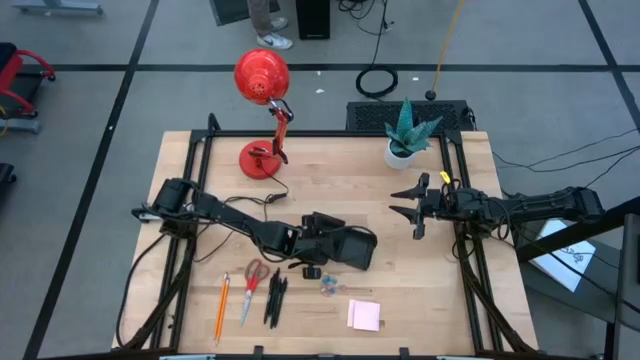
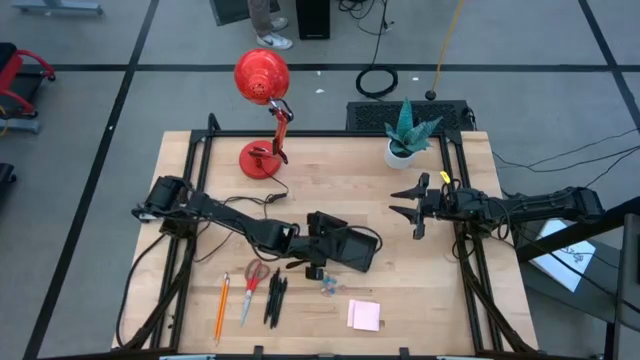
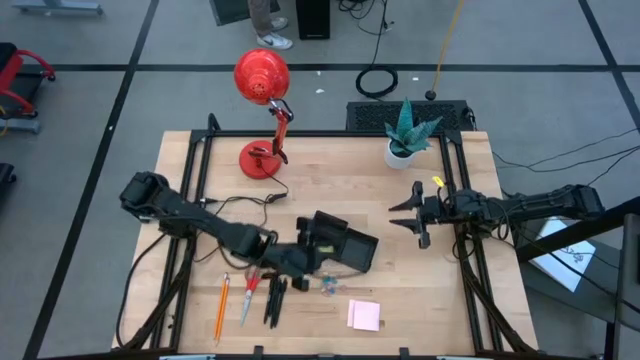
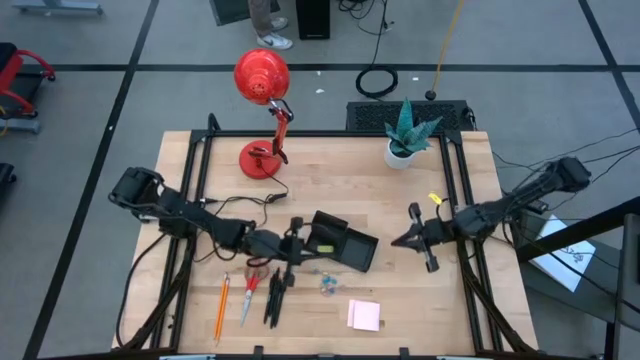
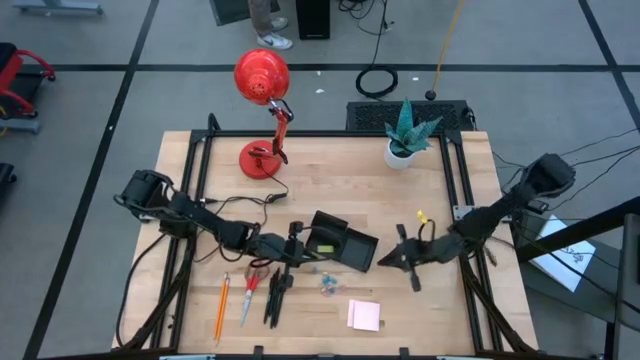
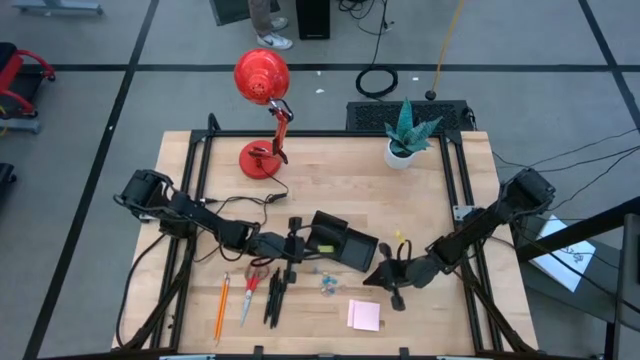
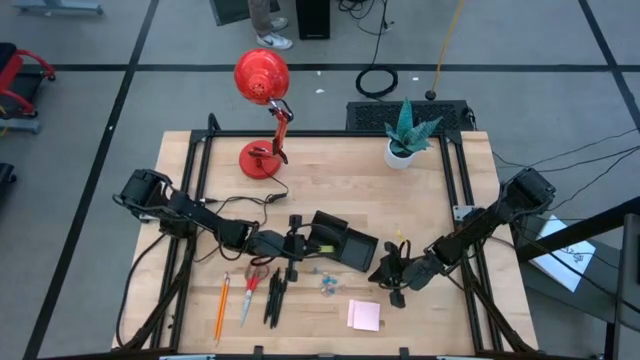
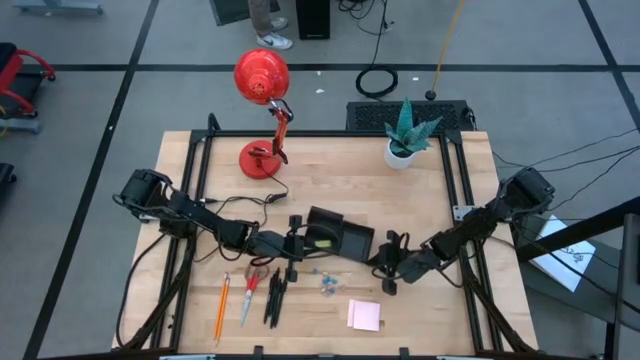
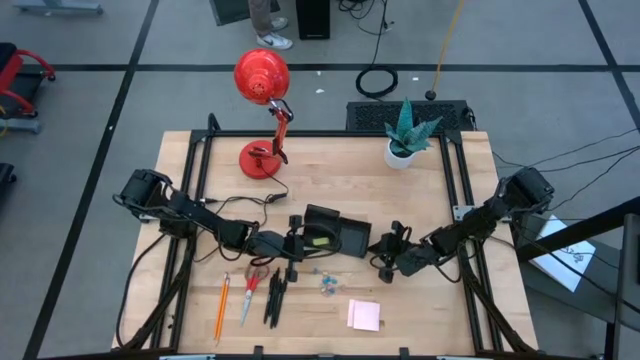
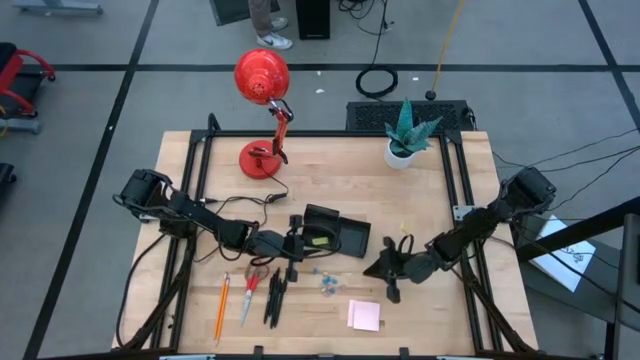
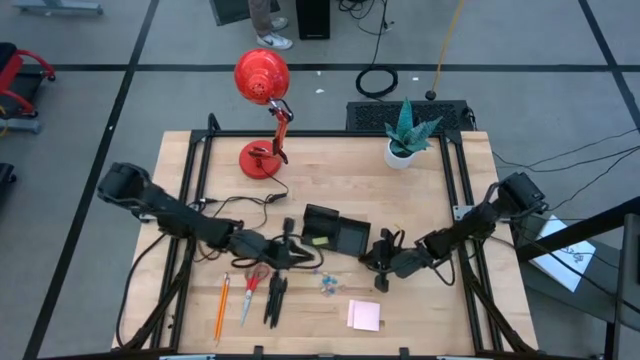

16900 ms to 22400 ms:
Task: Pick and place office supplies into organizer
Adjust the black desk organizer

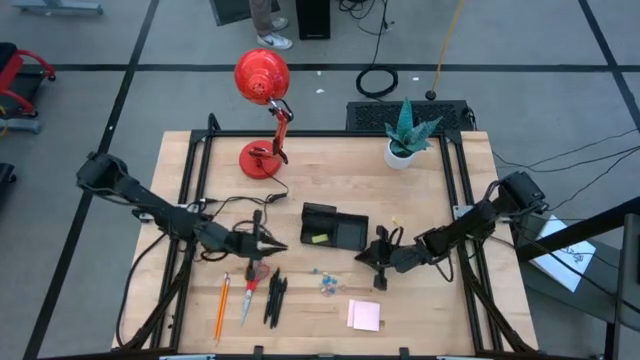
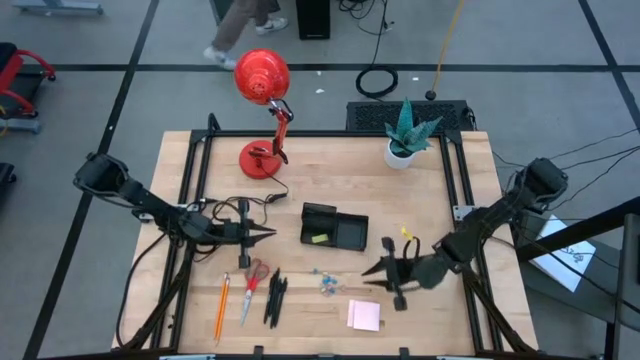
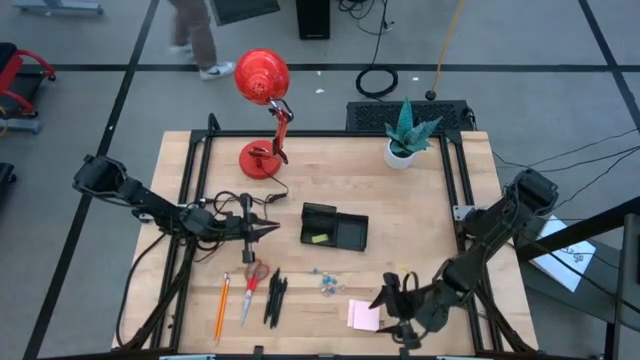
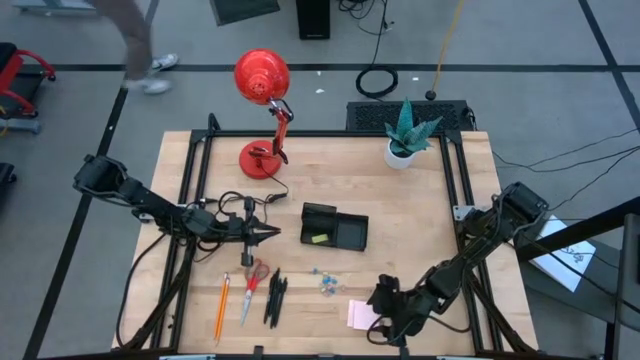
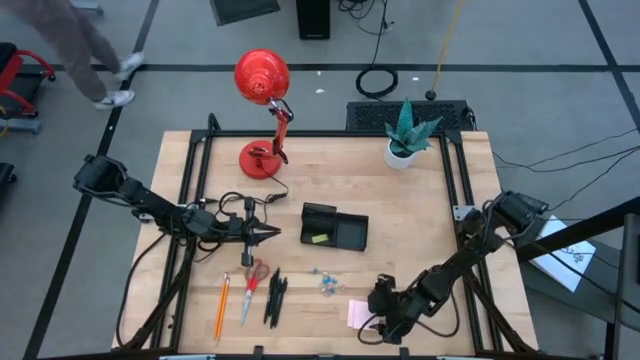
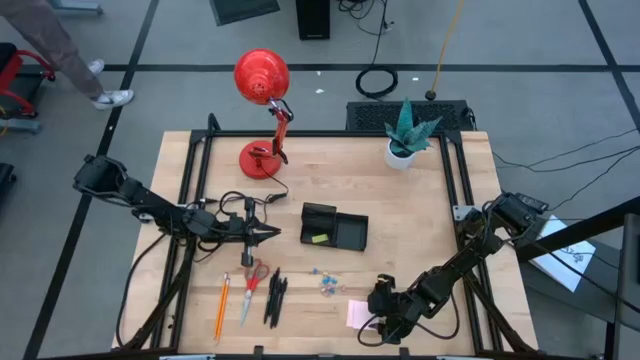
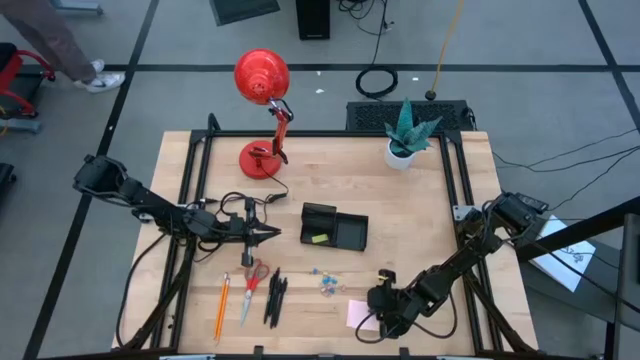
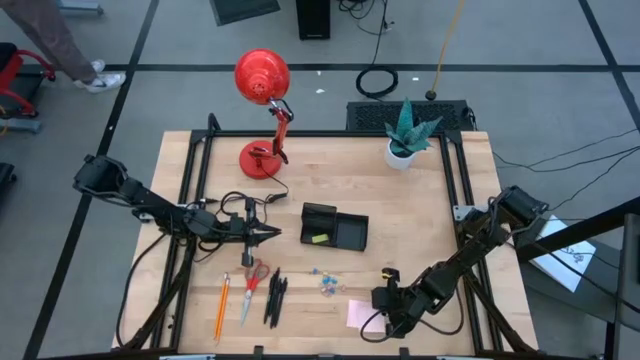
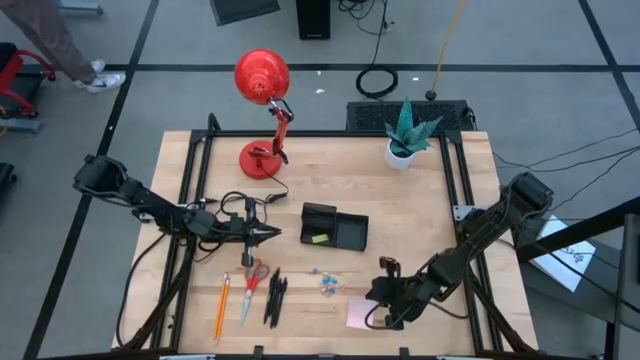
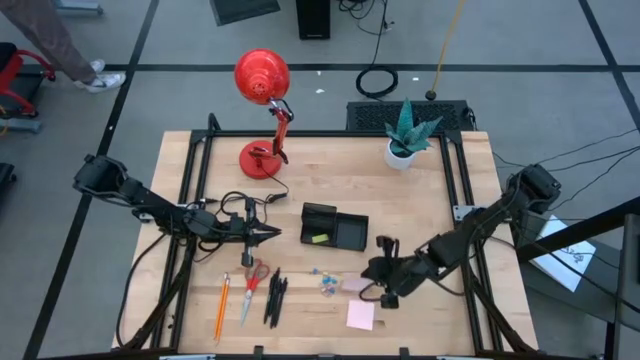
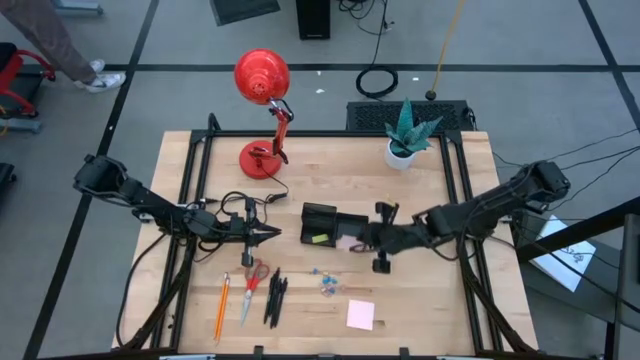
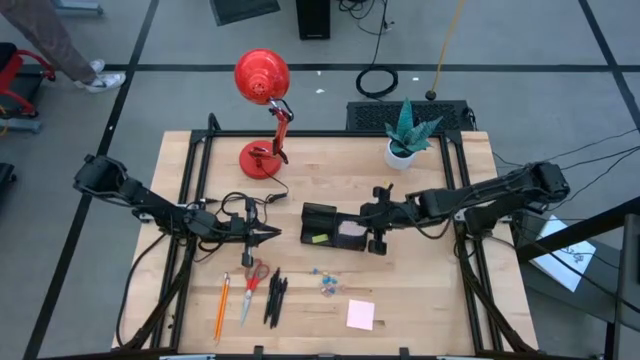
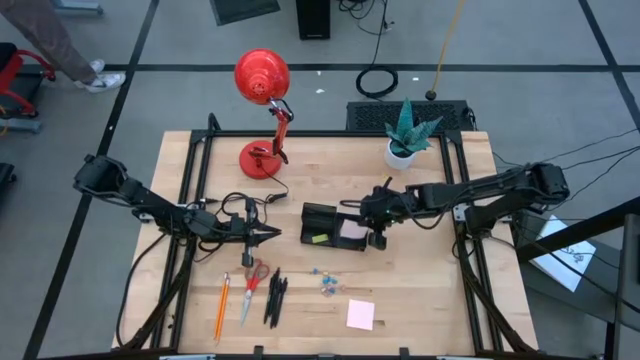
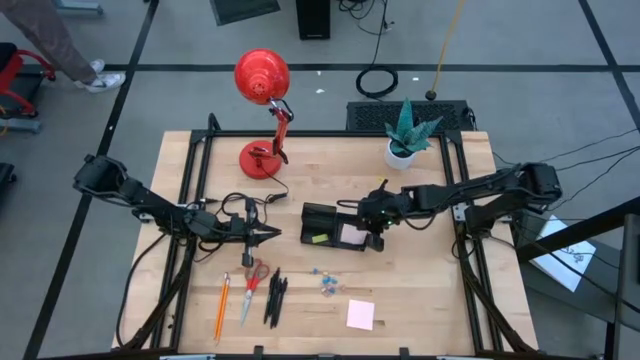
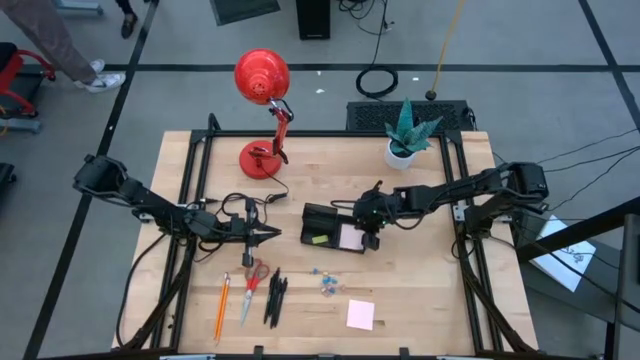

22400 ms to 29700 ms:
Put the pink sticky notes into the black desk organizer

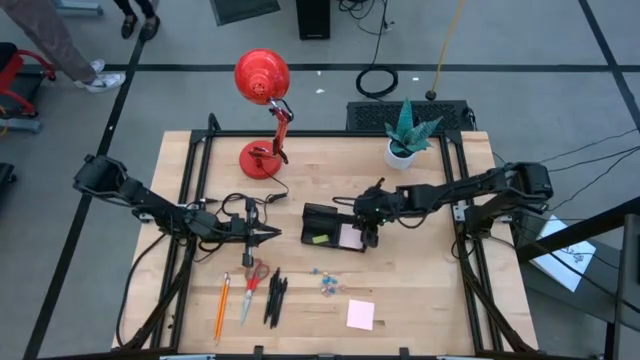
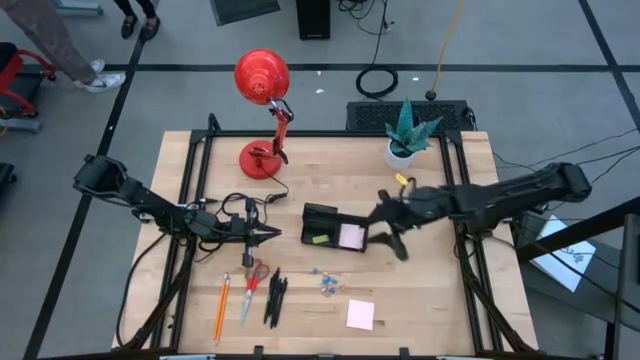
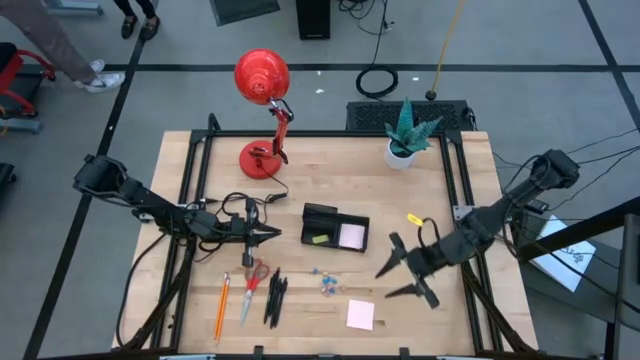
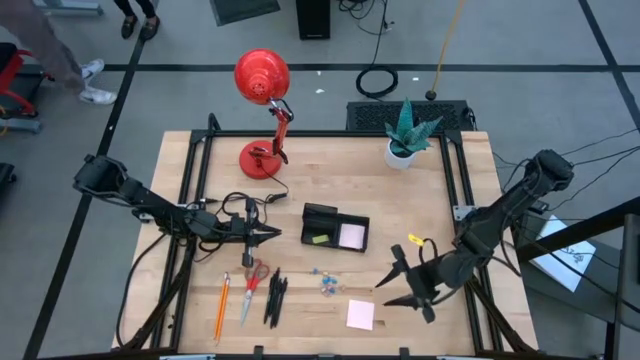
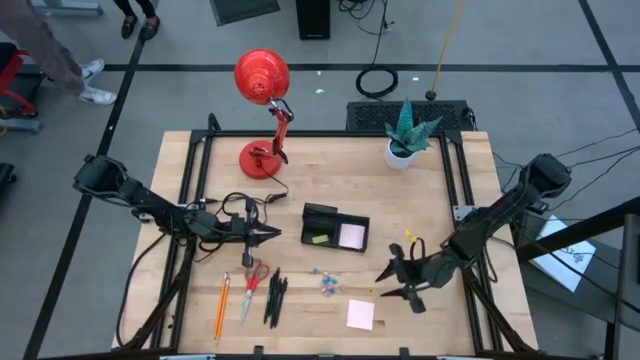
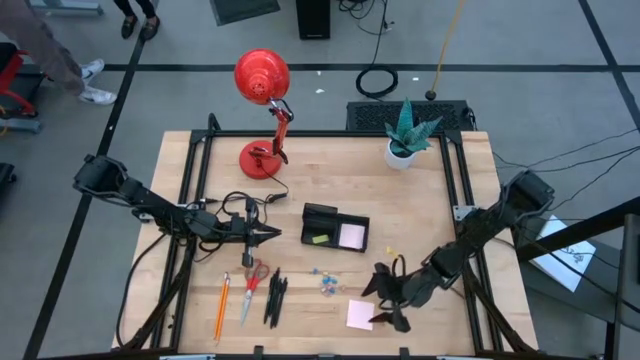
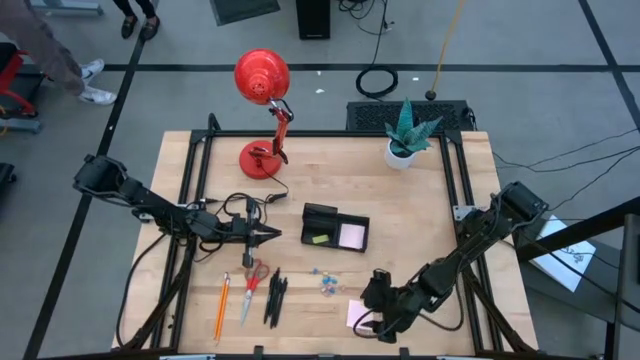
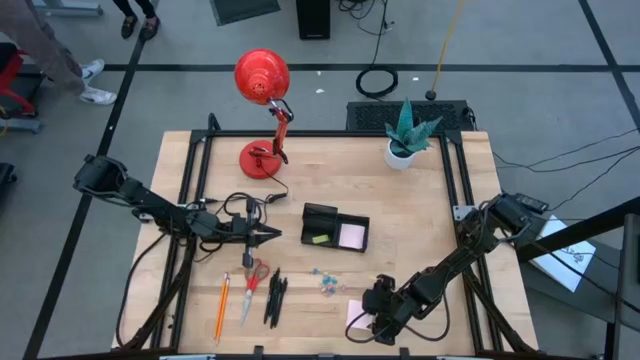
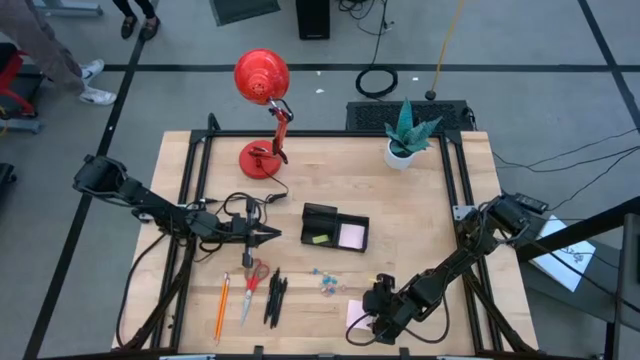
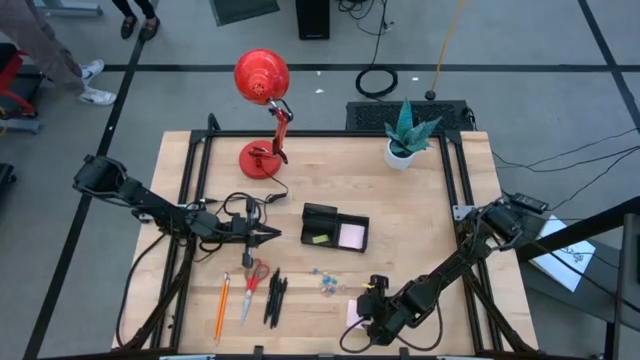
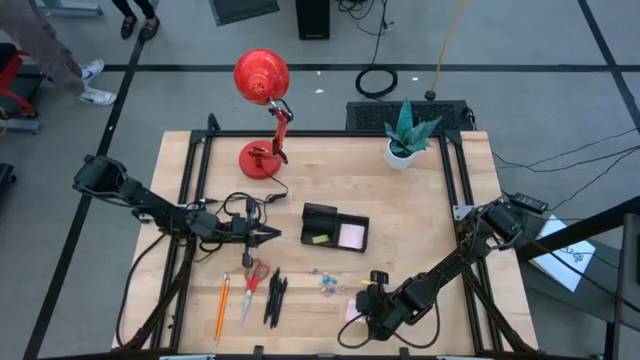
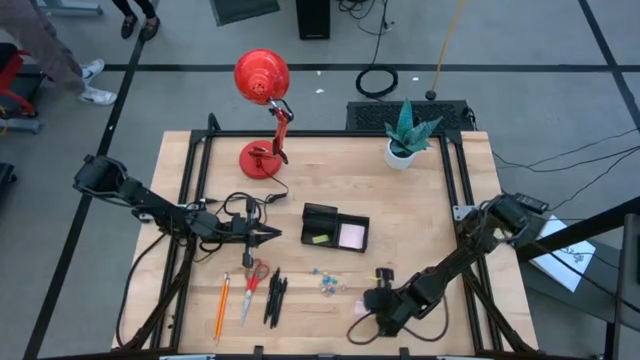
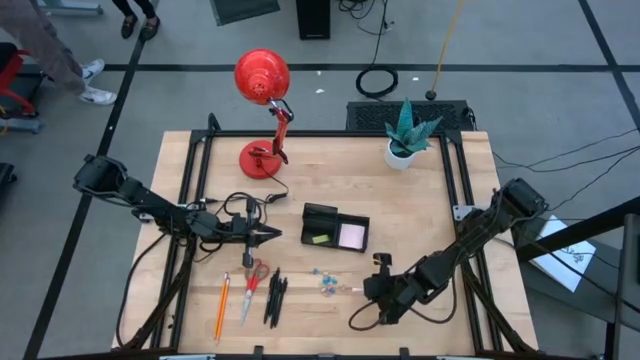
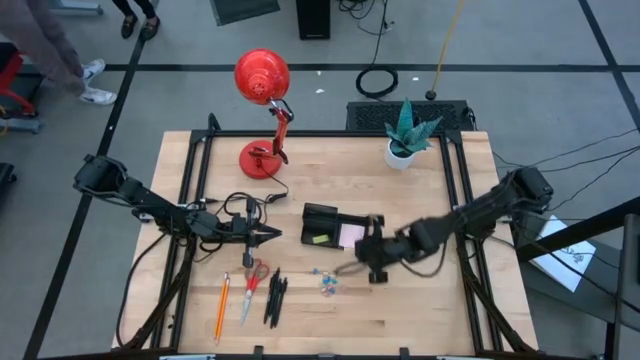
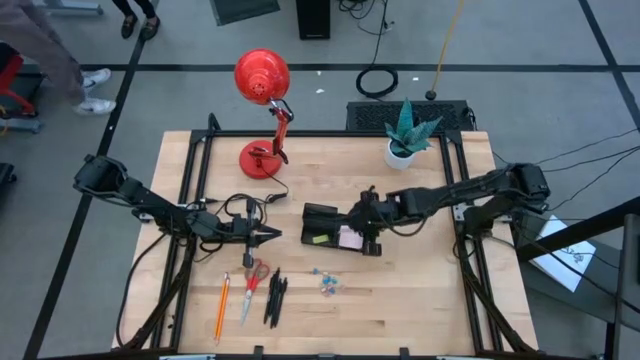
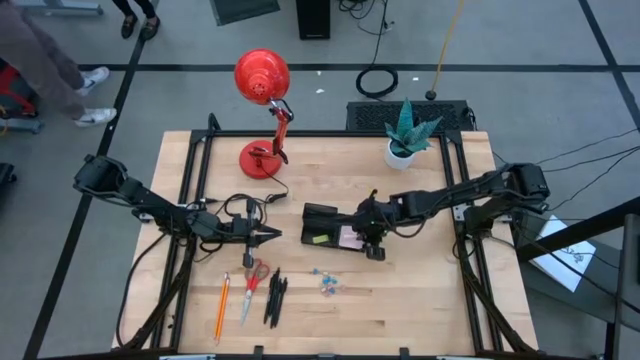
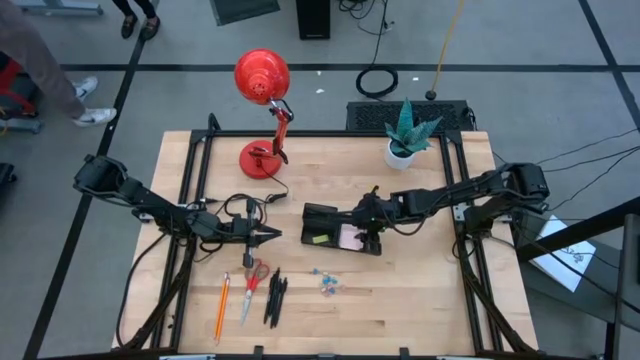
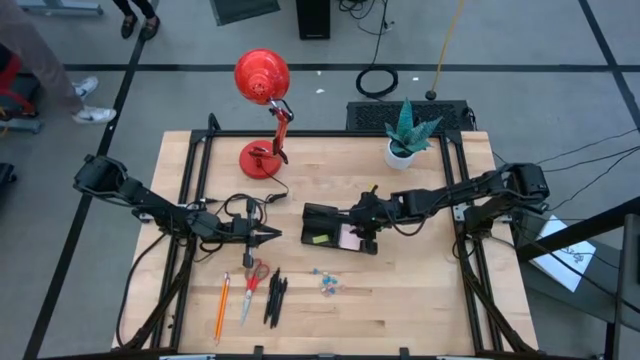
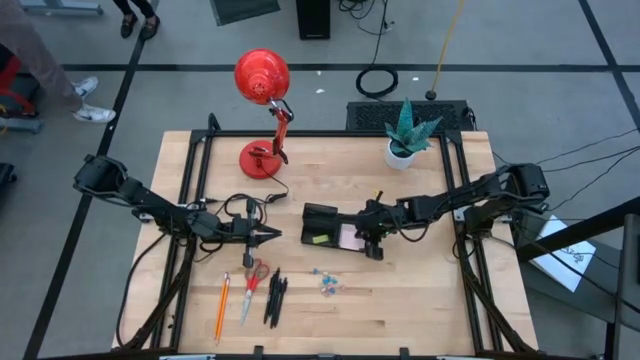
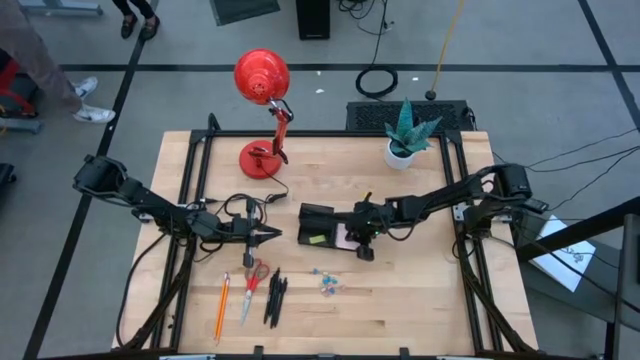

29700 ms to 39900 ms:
Put the pink sticky note into the black desk organizer
